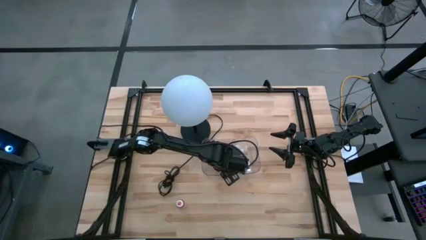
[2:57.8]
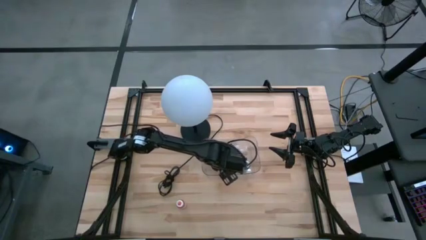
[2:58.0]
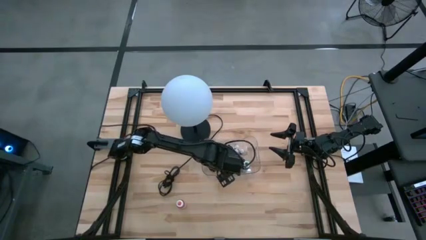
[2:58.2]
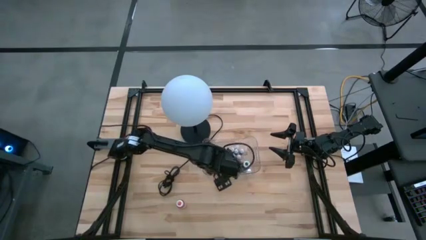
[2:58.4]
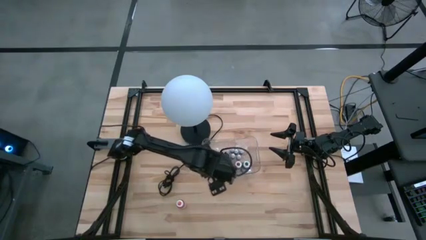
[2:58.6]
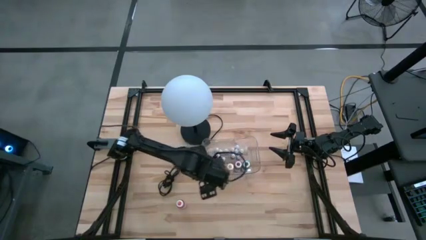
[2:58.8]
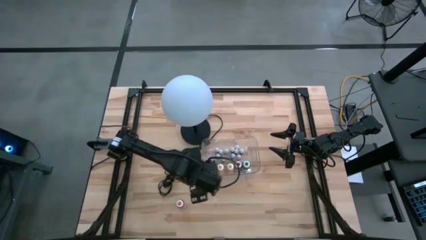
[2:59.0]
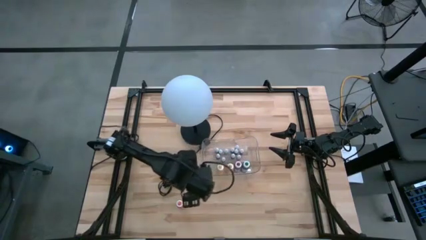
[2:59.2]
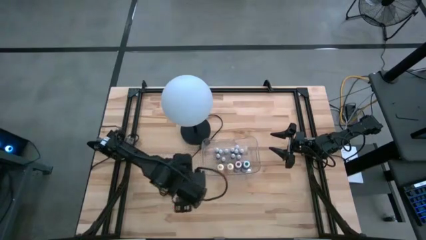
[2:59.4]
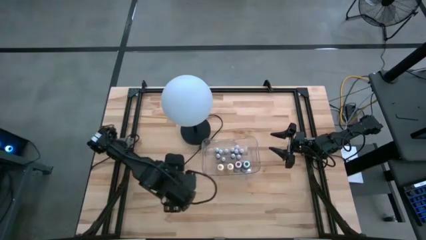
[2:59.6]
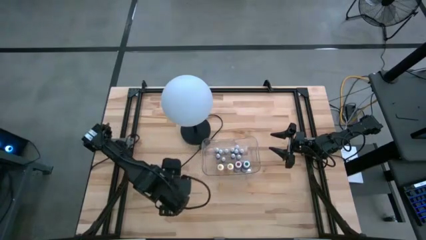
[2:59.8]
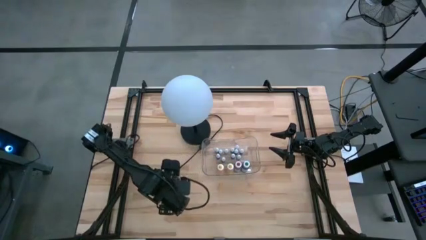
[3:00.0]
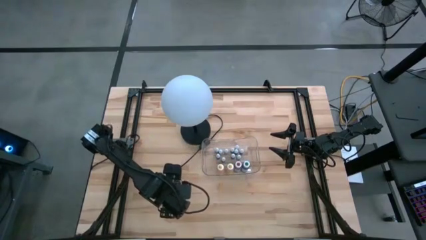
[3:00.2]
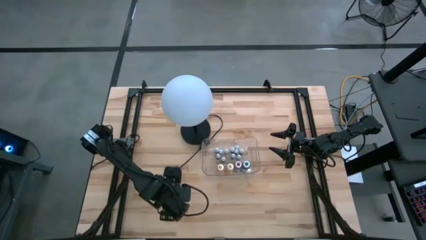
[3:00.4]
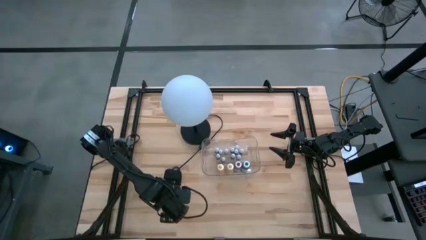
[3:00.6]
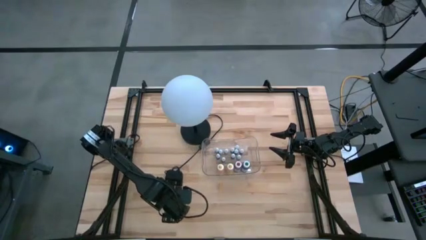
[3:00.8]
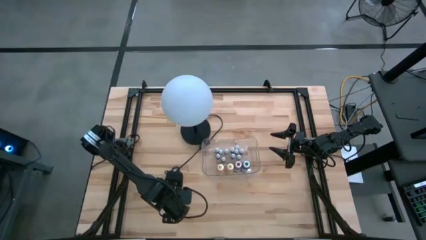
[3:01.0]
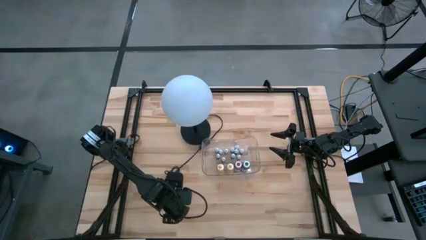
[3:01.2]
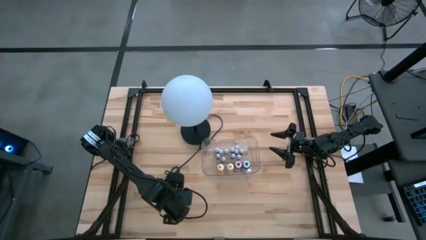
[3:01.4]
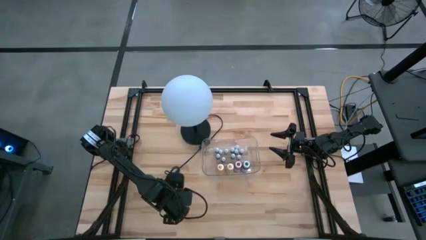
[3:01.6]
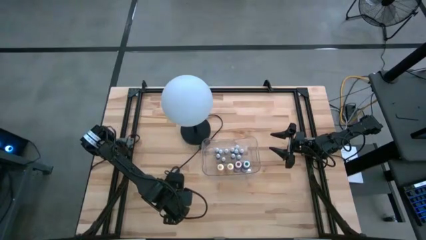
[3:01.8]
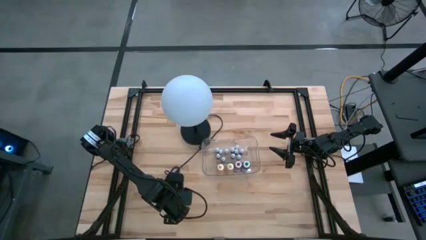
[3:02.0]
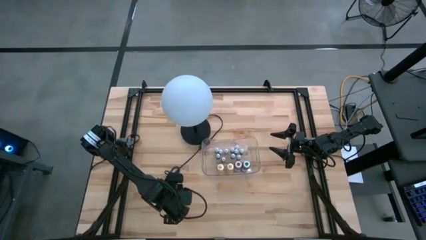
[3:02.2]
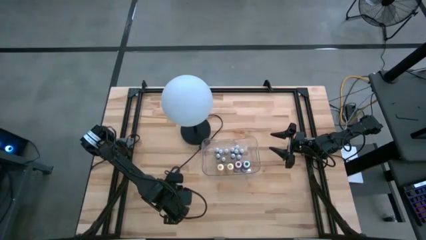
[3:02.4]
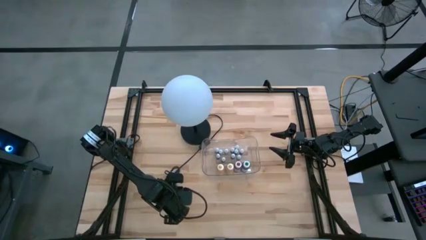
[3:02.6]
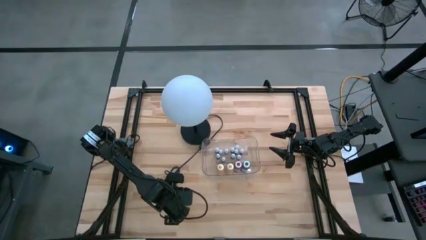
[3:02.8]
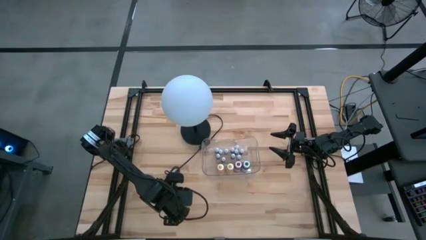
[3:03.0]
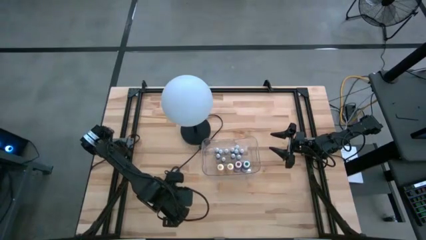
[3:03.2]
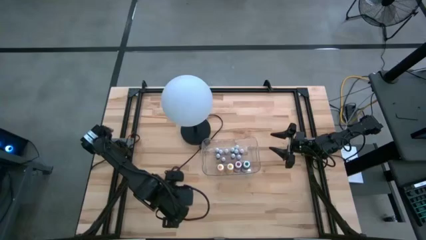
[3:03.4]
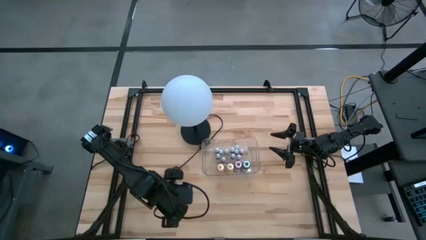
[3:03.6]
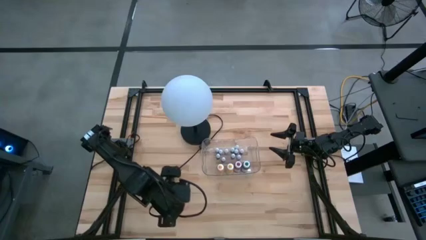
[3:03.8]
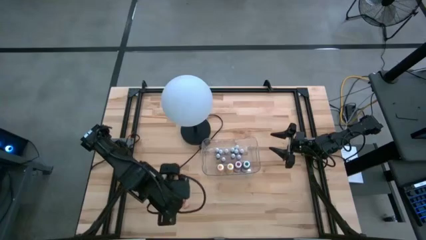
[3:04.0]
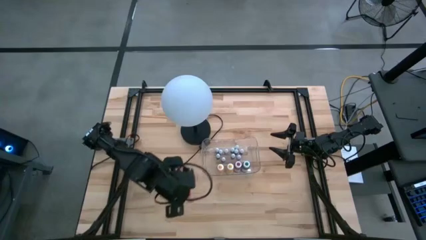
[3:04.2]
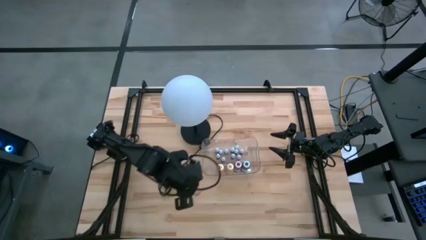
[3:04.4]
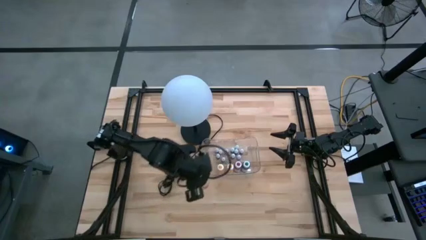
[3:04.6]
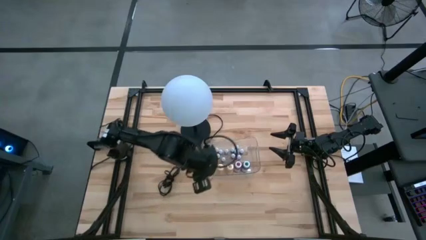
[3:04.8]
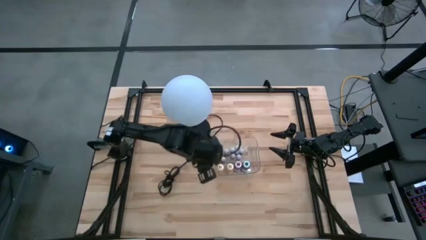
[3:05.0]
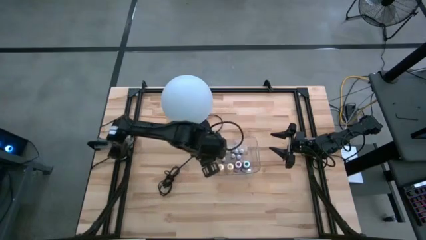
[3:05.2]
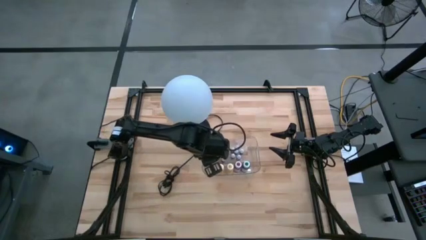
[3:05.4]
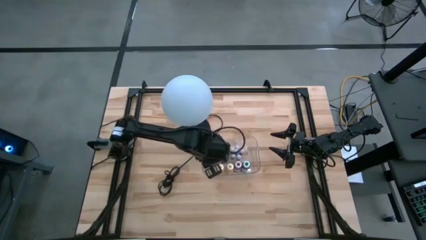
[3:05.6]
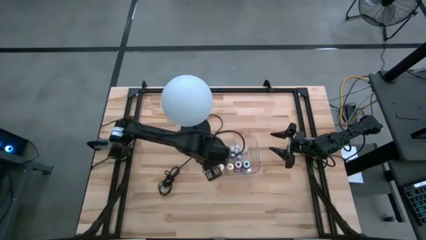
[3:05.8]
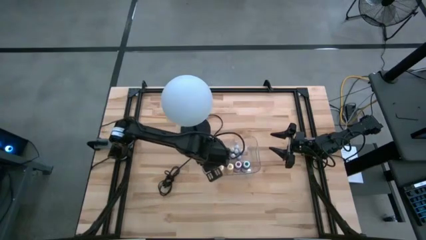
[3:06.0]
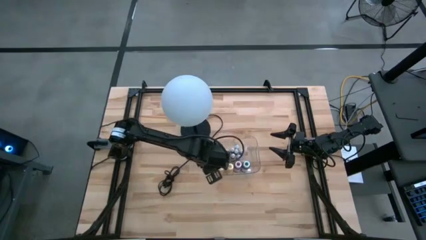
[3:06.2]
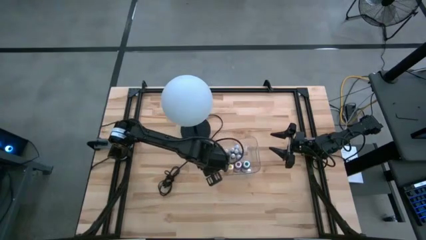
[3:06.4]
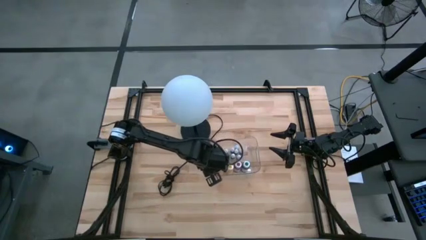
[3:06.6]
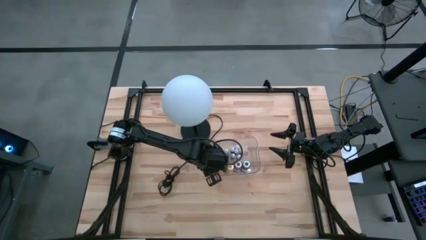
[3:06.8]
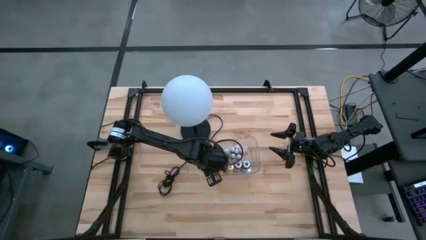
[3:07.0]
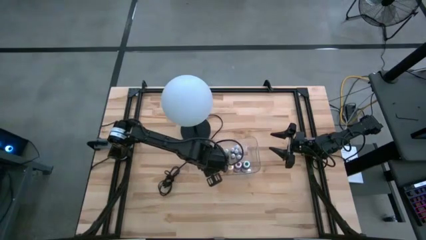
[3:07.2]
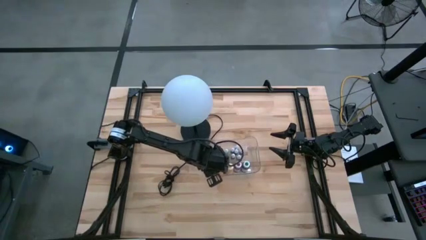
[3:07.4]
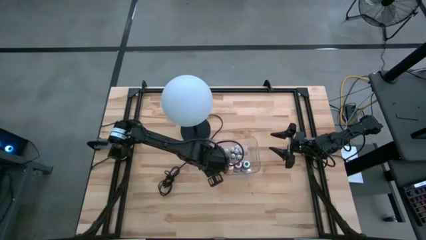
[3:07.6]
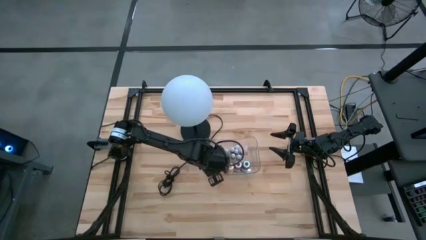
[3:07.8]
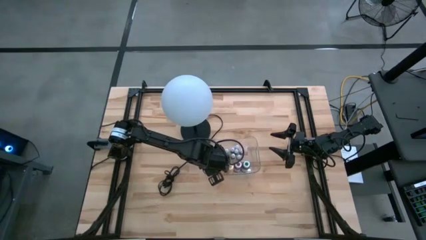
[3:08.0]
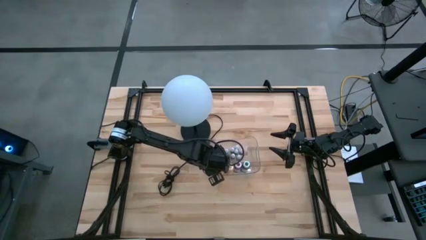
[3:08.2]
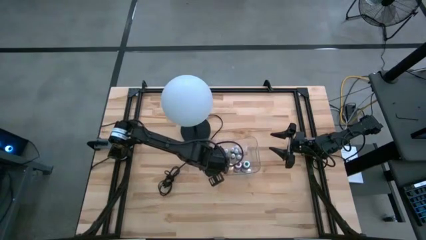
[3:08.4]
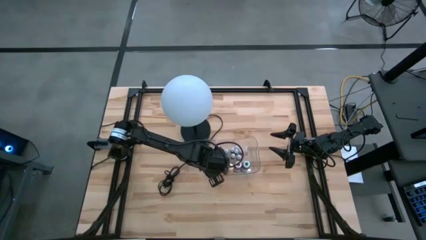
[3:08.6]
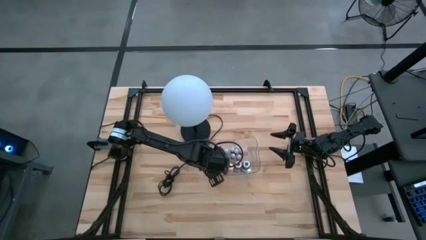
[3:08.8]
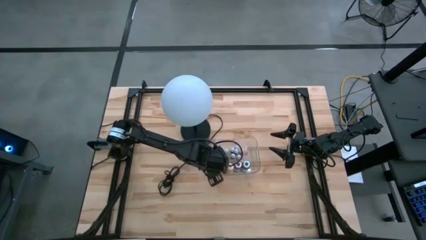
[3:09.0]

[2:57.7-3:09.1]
Task: Pick & Place food coloring
Put the large orange food coloring bottle into the transparent bin

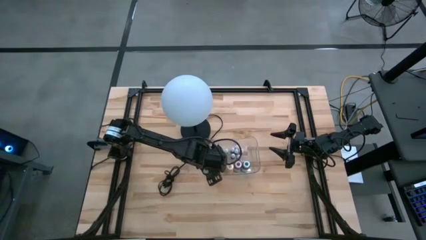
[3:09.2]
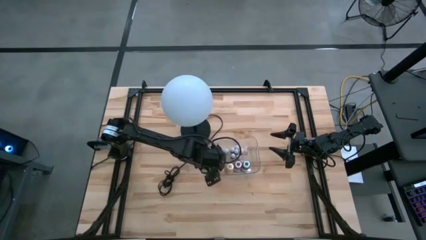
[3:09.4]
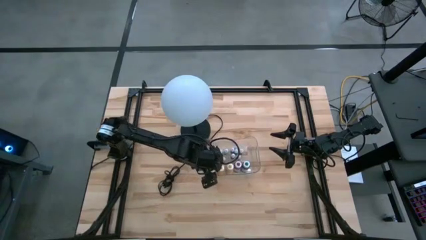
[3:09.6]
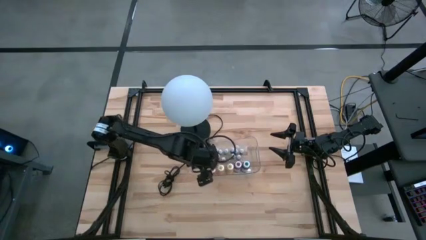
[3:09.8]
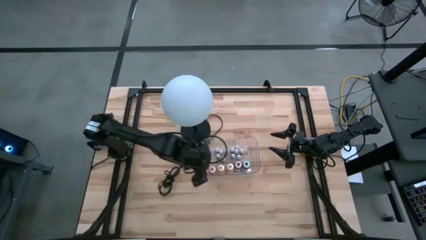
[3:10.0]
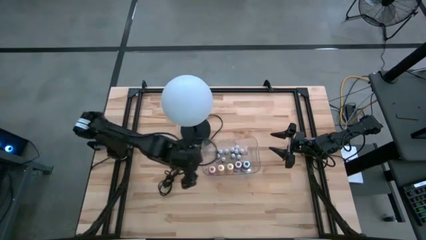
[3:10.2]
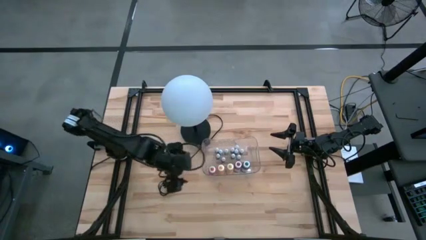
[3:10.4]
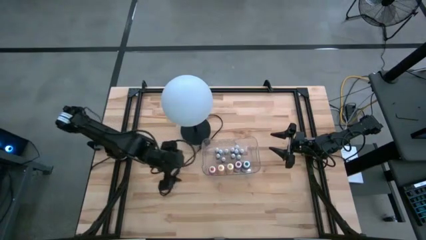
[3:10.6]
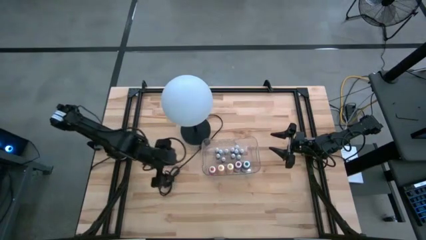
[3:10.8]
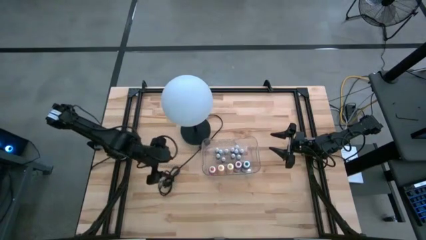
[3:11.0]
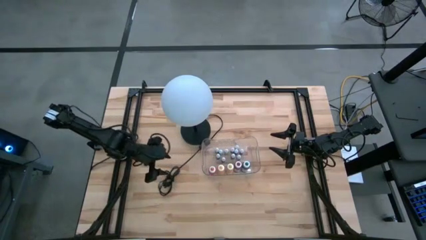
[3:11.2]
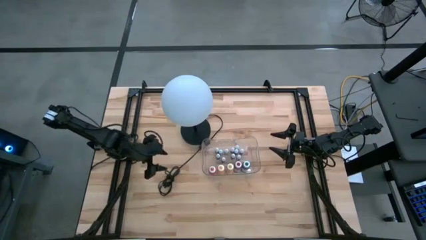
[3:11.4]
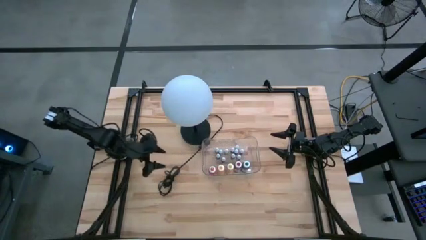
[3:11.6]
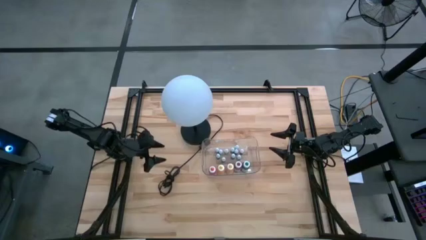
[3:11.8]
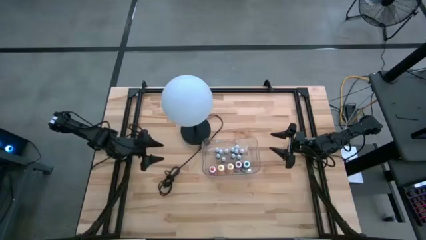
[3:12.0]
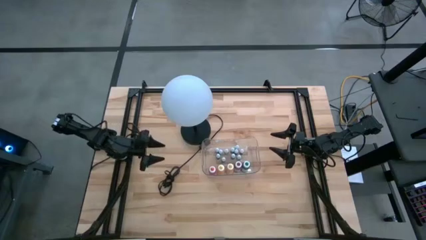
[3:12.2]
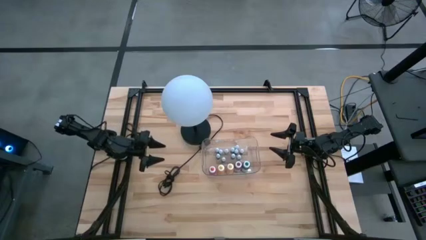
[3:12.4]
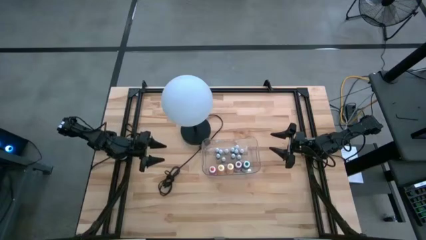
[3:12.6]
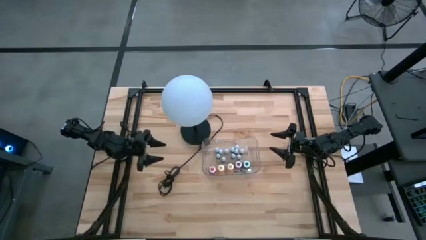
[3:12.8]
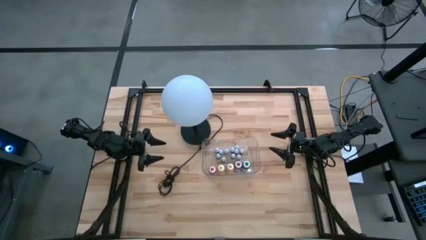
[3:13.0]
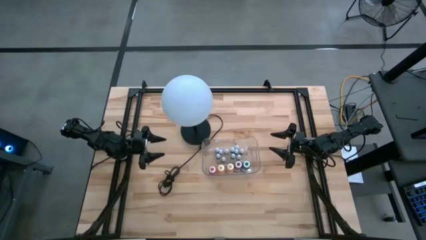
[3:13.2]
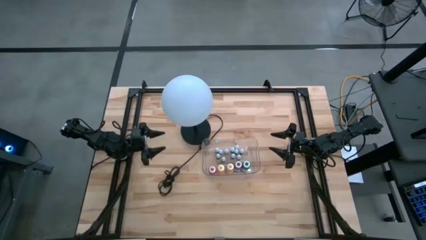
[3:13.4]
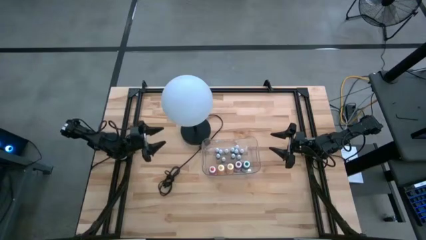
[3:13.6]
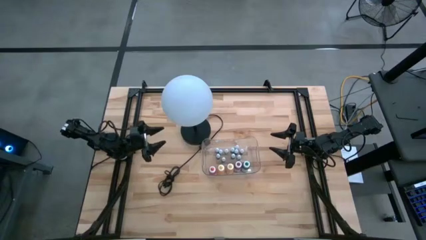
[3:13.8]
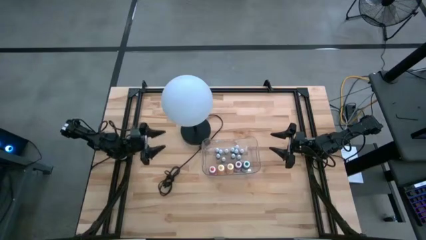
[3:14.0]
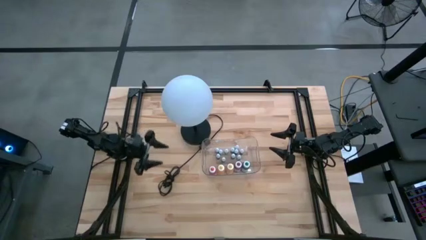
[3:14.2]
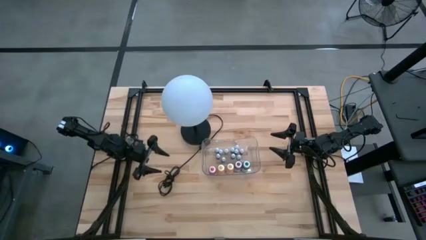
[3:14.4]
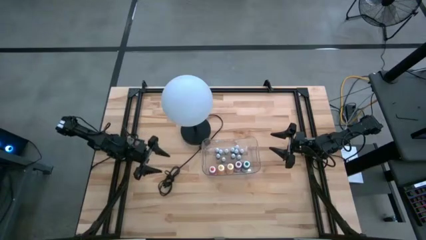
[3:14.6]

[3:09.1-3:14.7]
Return to Home Position
